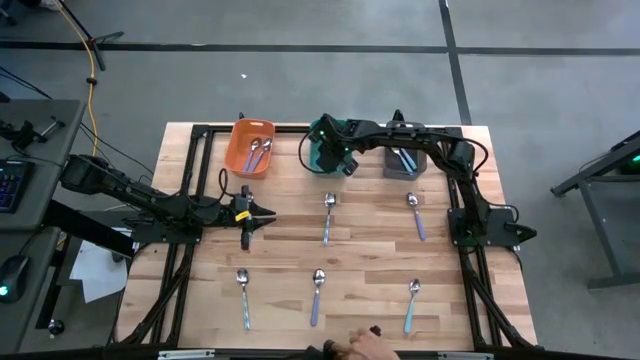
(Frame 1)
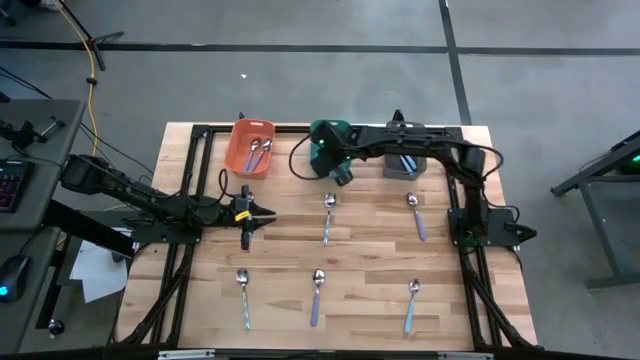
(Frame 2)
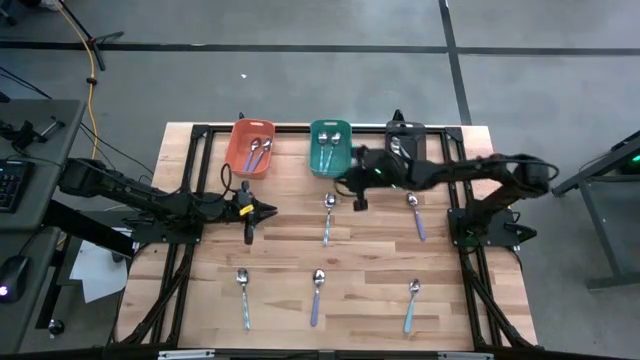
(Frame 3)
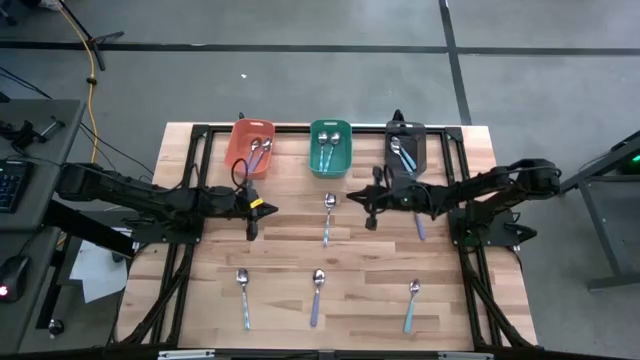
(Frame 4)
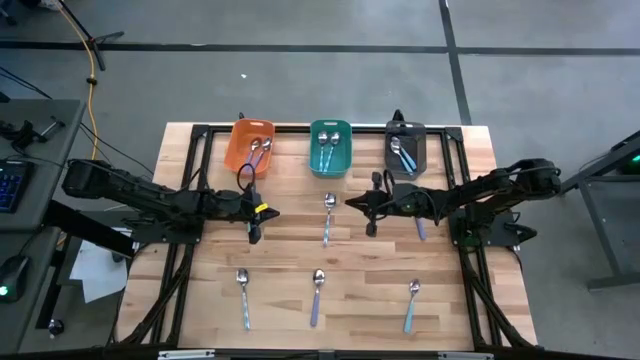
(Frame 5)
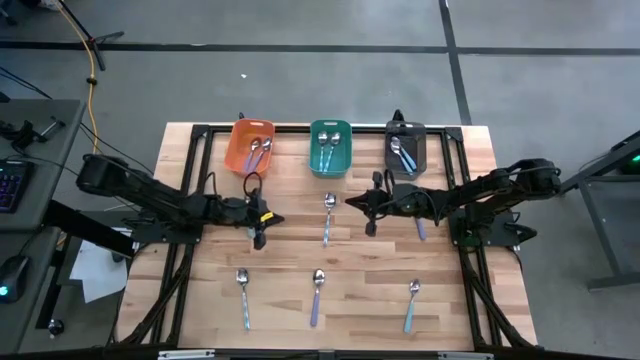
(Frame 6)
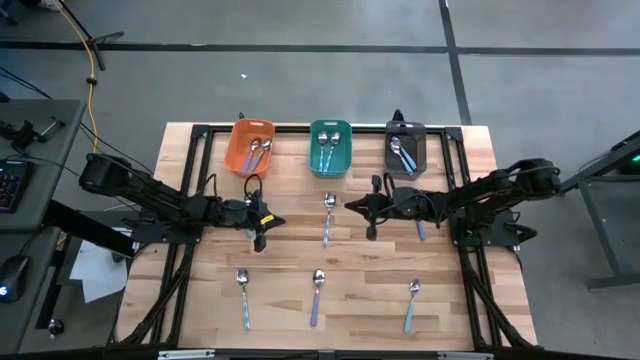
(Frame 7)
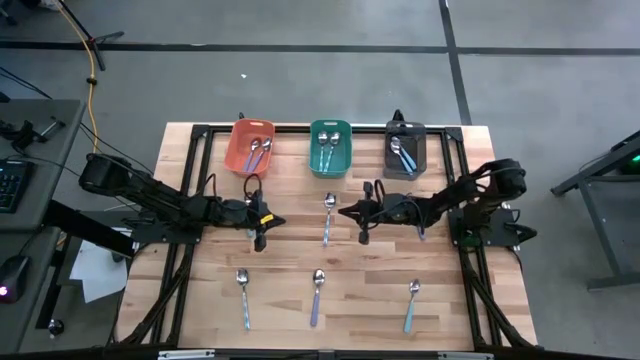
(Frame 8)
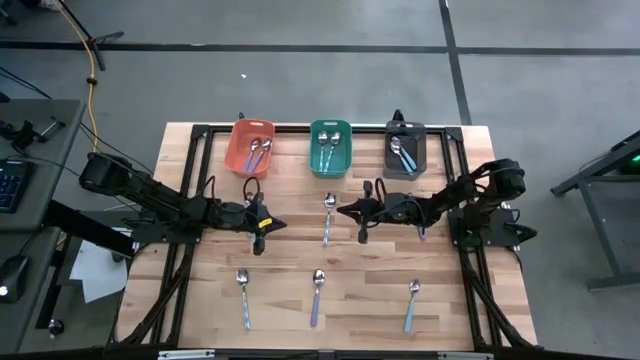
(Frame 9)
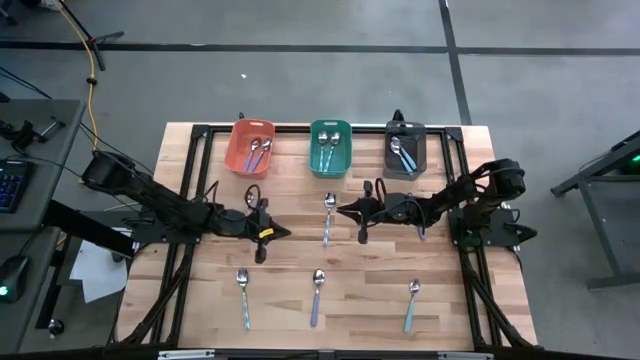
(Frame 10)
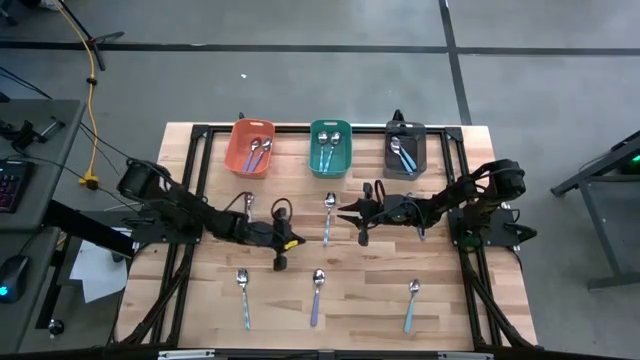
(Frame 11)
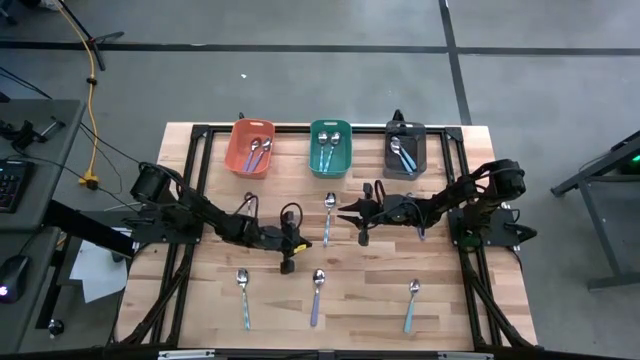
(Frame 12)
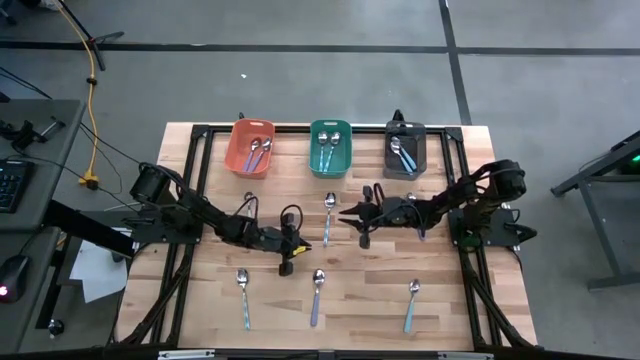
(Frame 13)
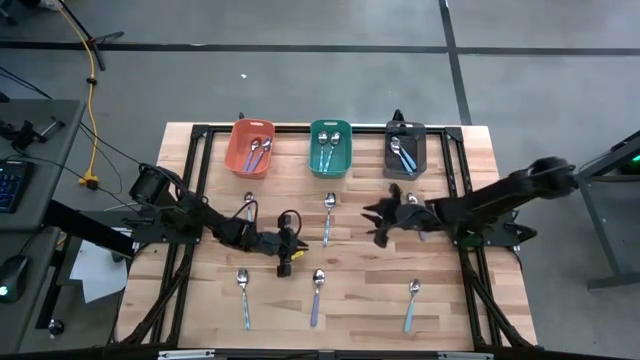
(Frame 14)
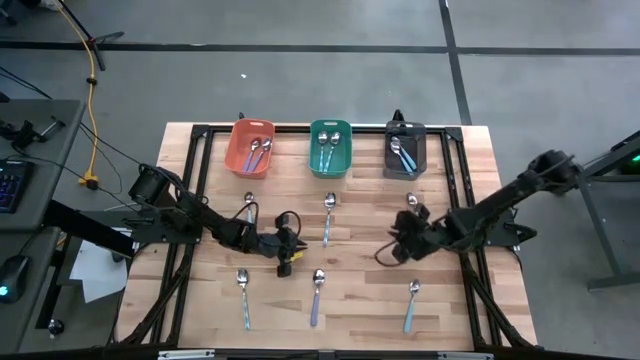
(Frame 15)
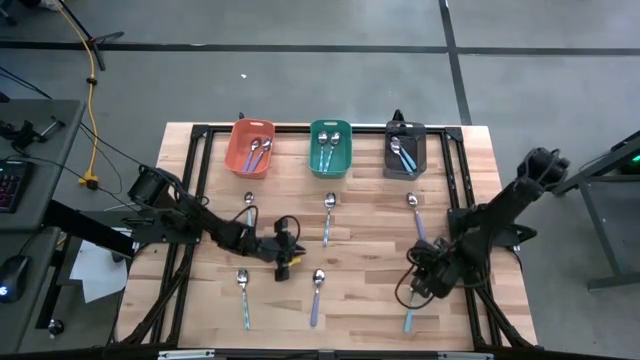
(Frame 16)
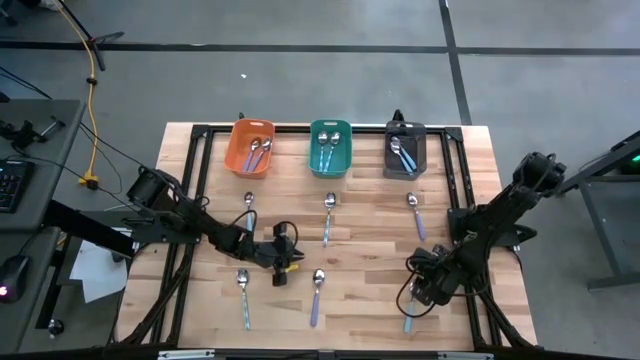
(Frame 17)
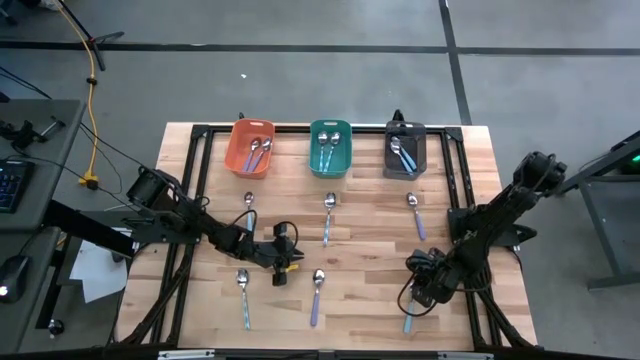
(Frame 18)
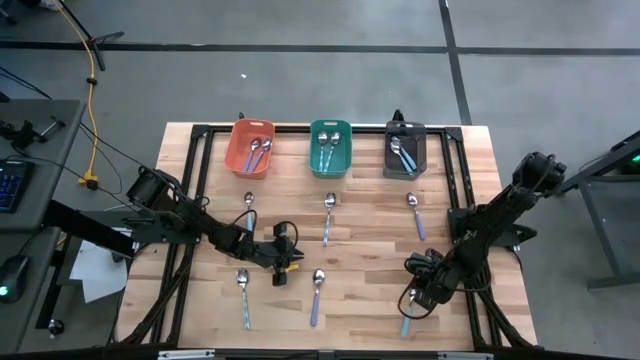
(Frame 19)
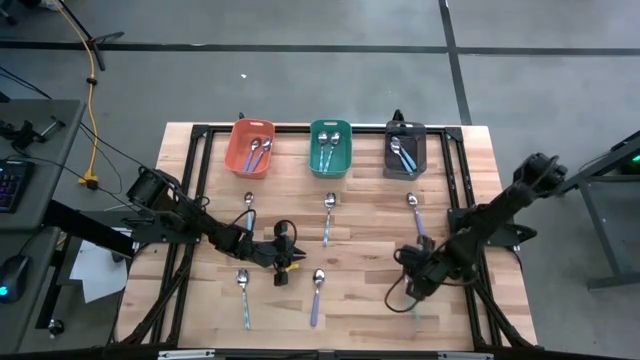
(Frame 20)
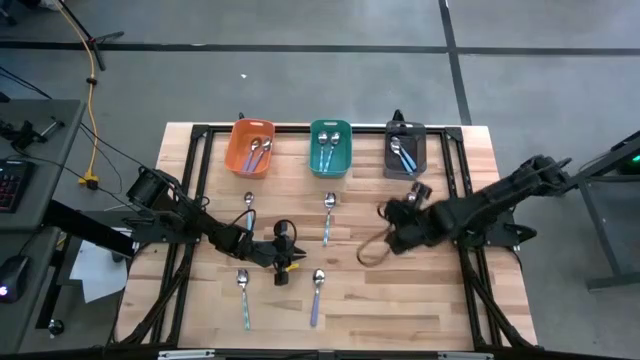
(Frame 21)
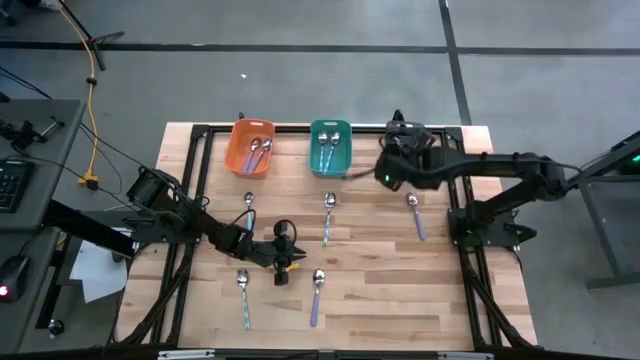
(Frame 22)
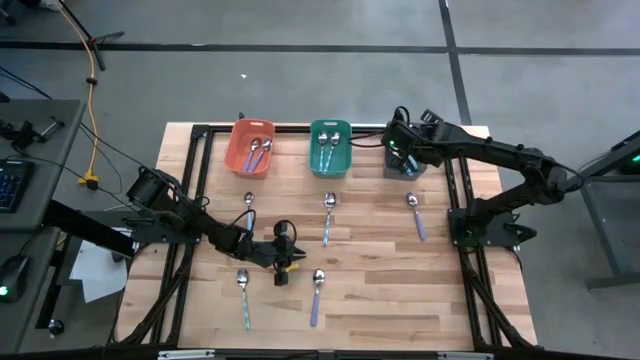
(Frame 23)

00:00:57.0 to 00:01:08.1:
Task: Sort silverware by color (type)
Put the blue spoon into the black bin

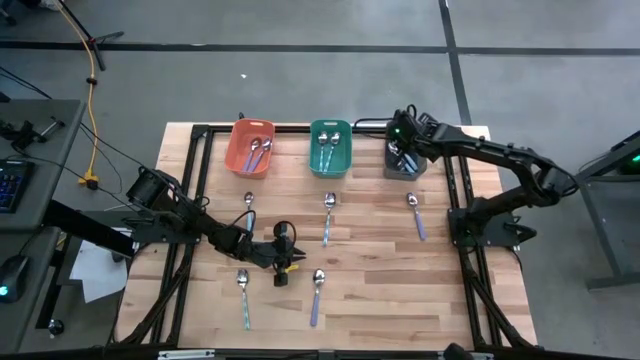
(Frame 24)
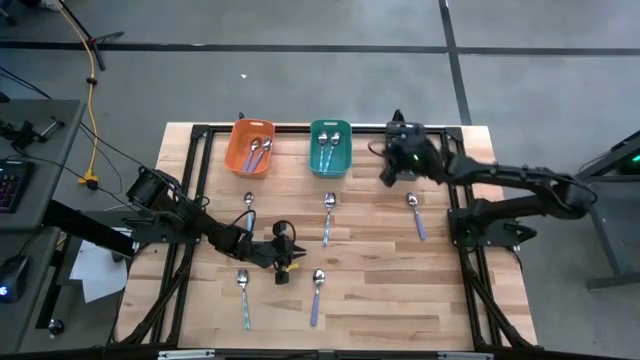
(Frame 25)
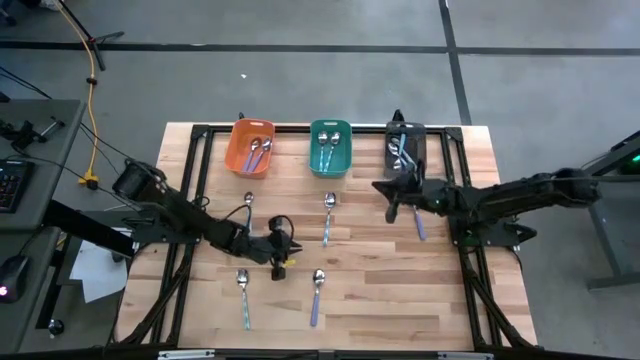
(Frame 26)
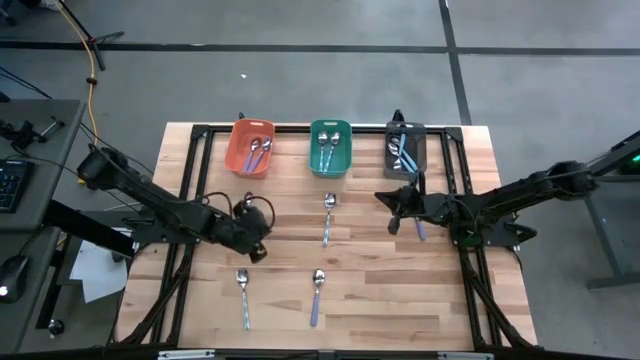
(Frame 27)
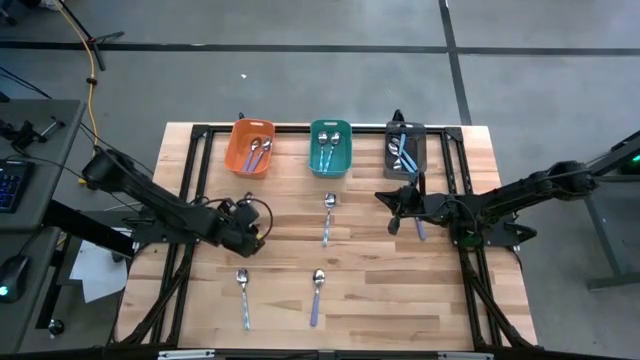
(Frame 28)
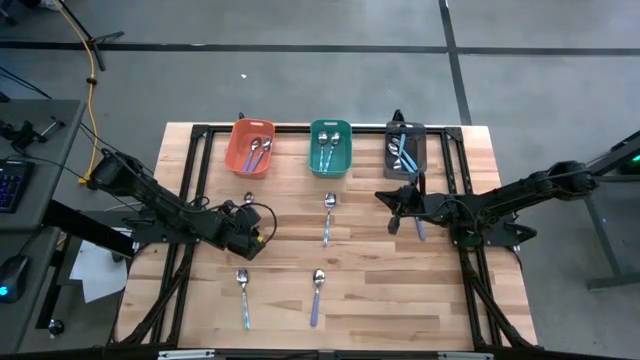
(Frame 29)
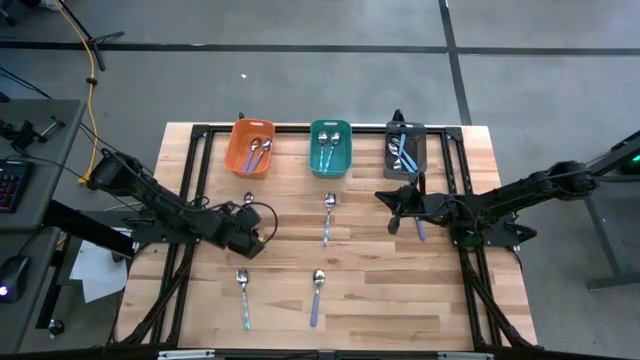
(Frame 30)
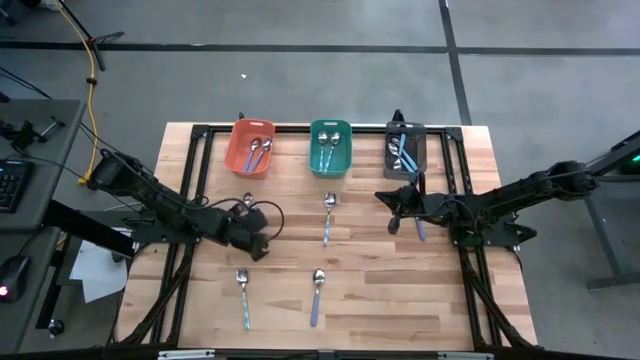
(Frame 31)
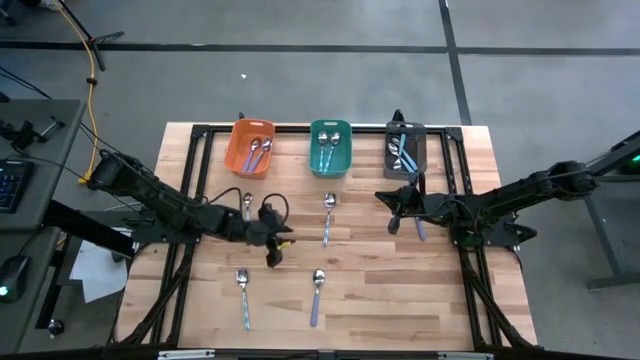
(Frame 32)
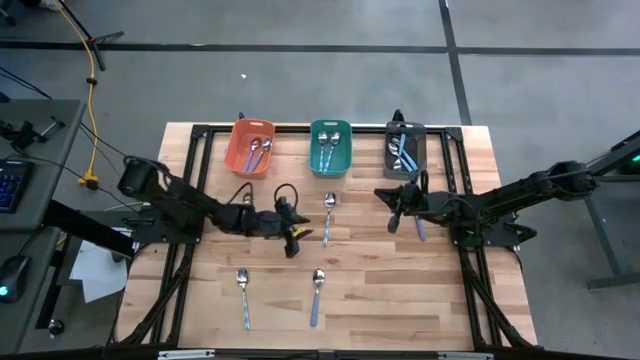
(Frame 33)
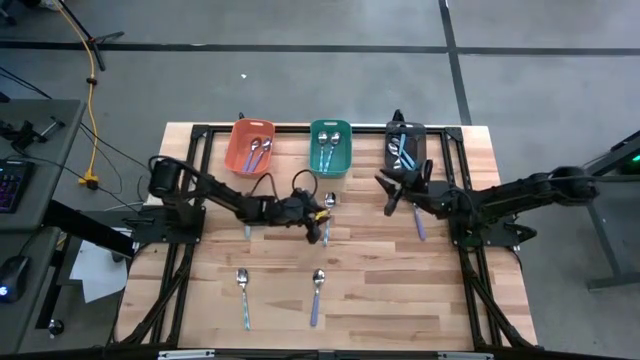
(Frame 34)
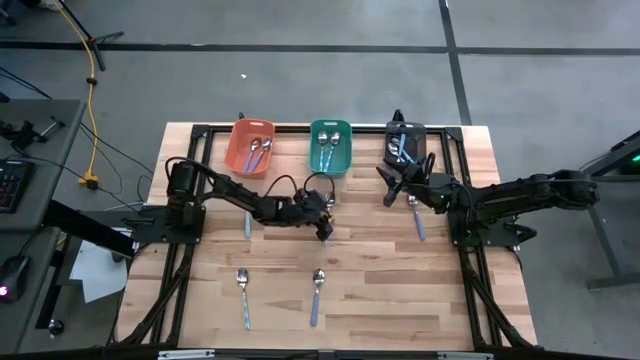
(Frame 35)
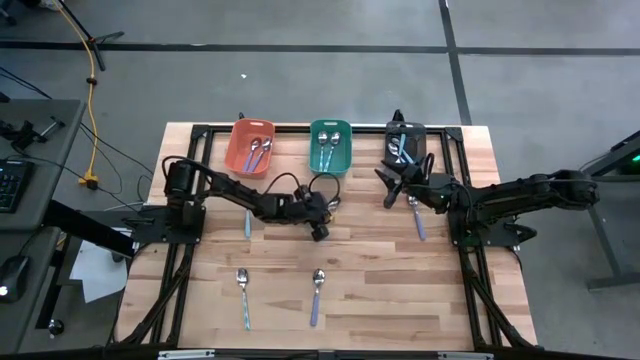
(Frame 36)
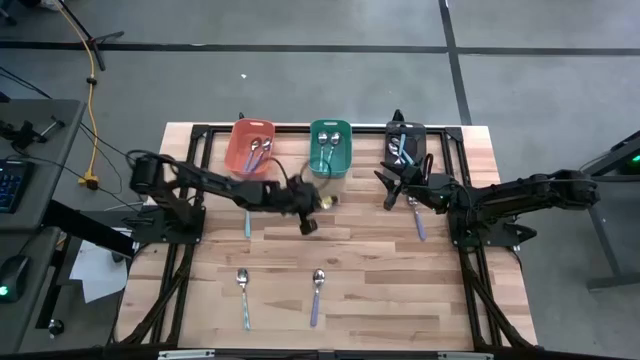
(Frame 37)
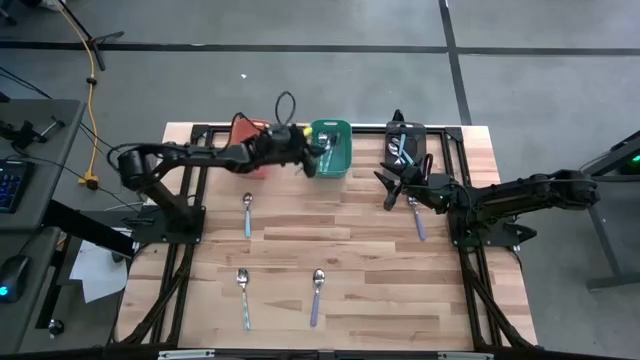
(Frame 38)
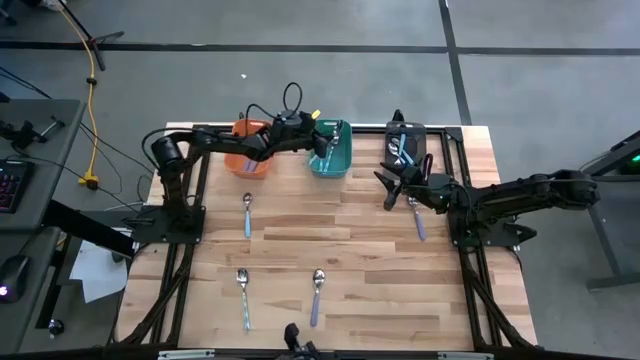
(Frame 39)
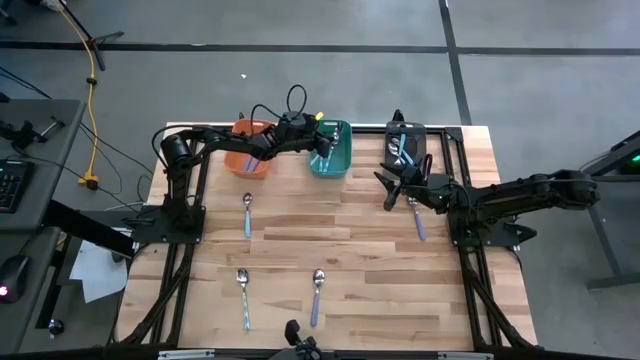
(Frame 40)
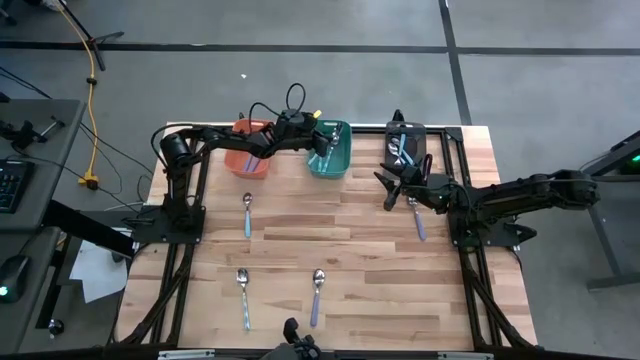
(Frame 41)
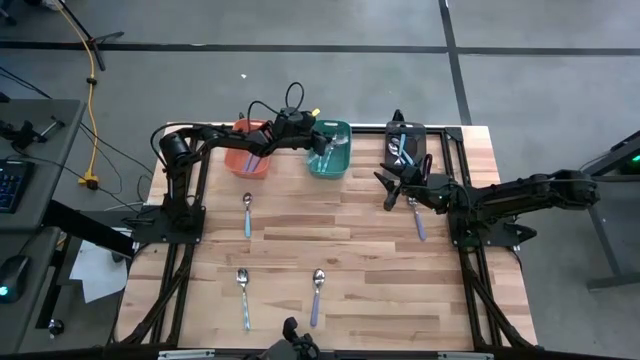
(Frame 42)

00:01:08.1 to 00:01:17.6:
Put the blue patterned spoon into the green bin
